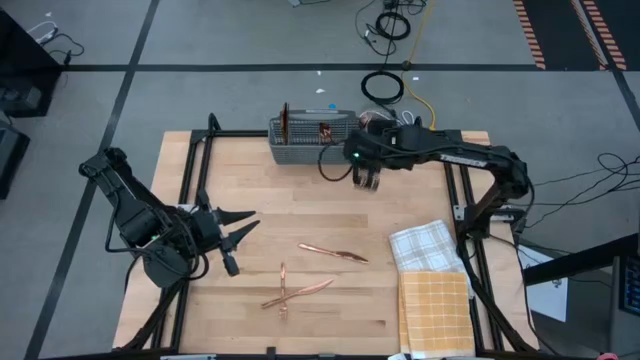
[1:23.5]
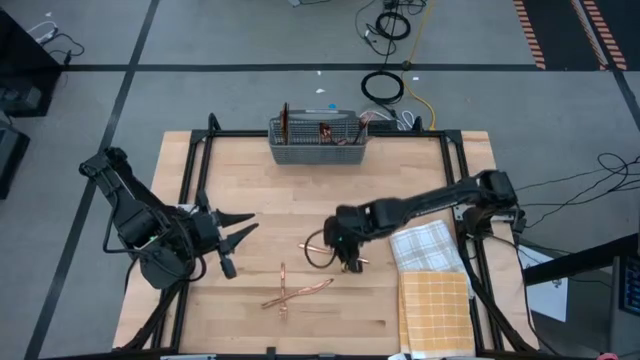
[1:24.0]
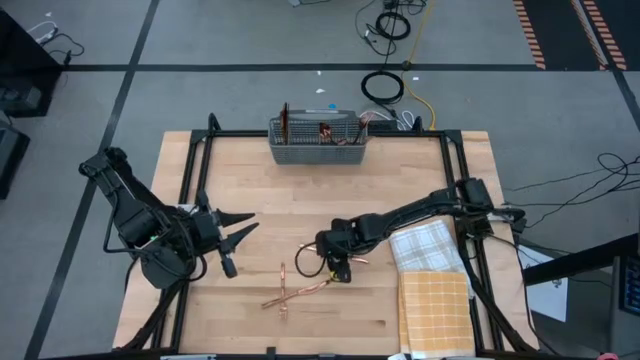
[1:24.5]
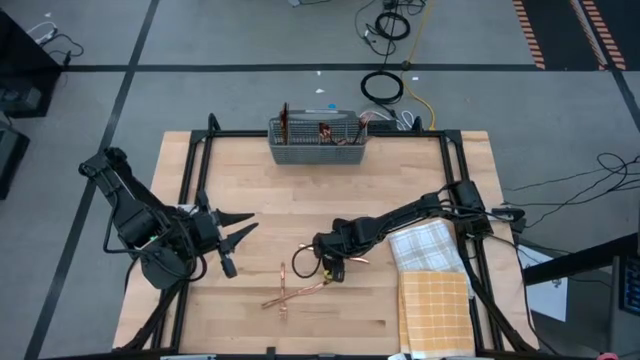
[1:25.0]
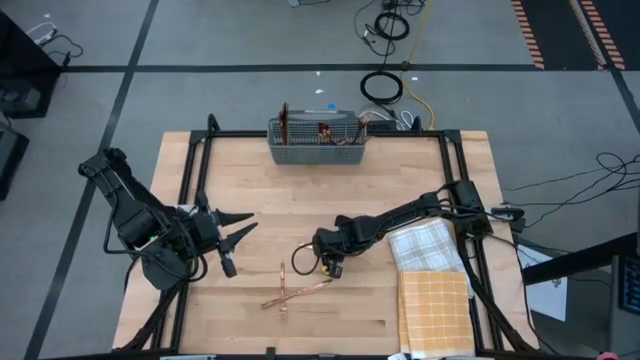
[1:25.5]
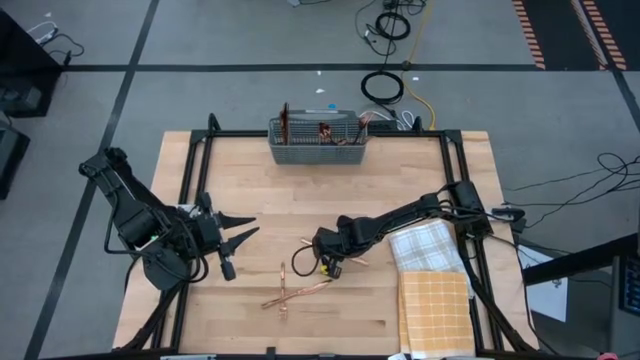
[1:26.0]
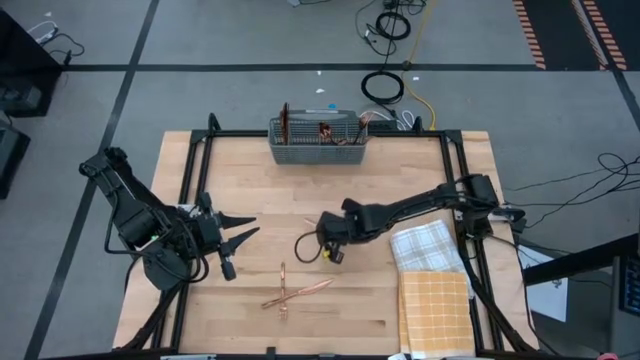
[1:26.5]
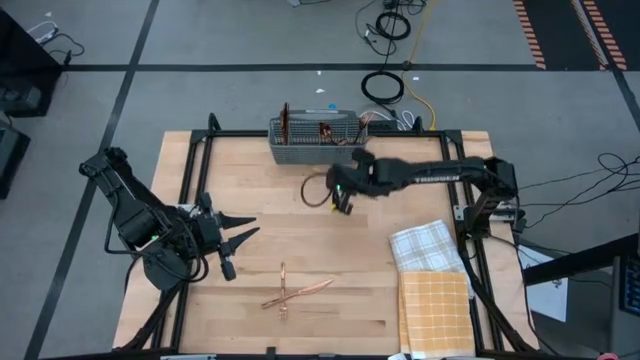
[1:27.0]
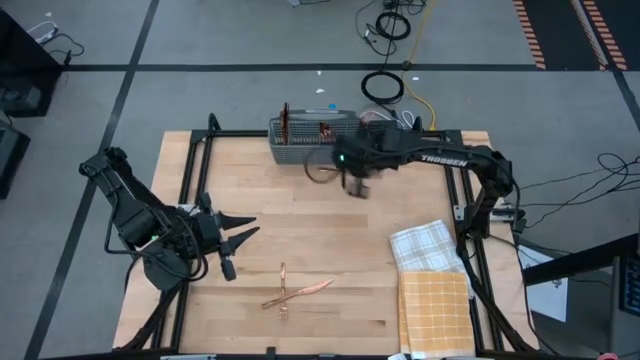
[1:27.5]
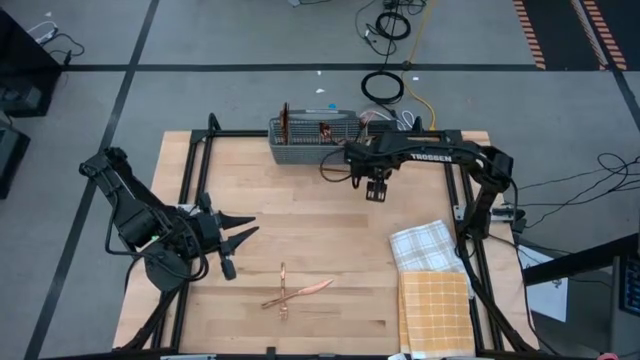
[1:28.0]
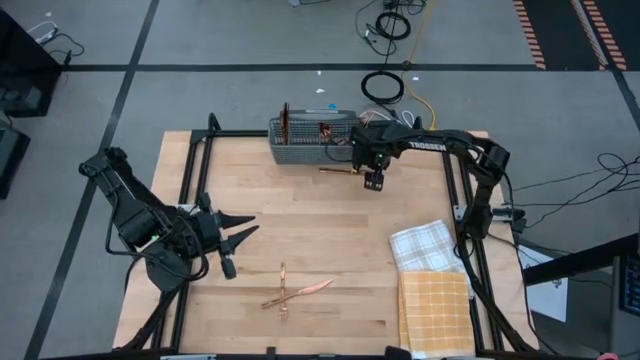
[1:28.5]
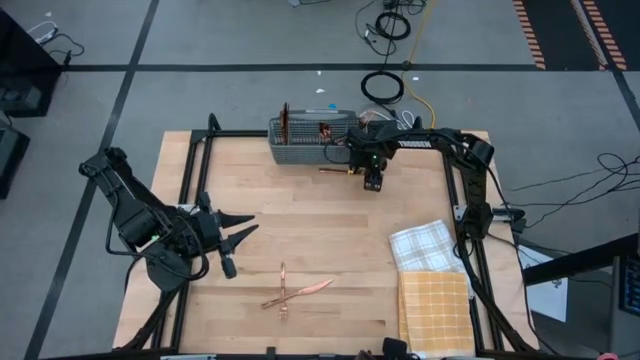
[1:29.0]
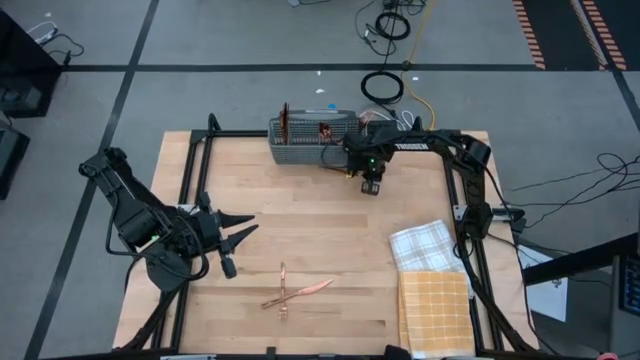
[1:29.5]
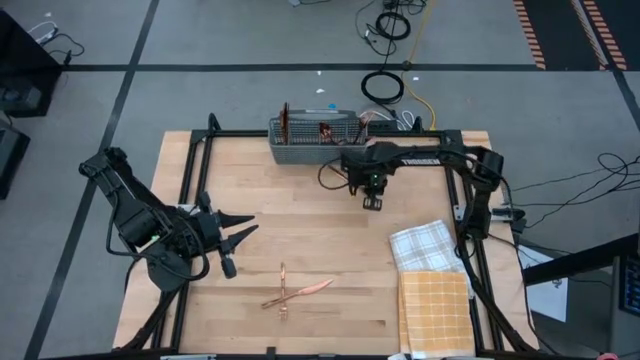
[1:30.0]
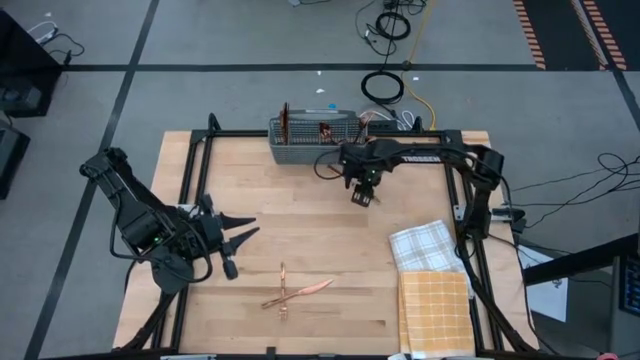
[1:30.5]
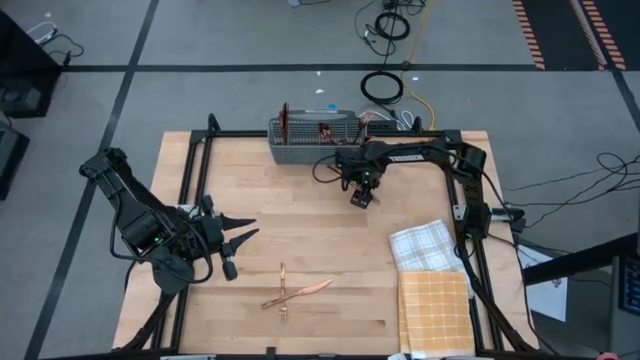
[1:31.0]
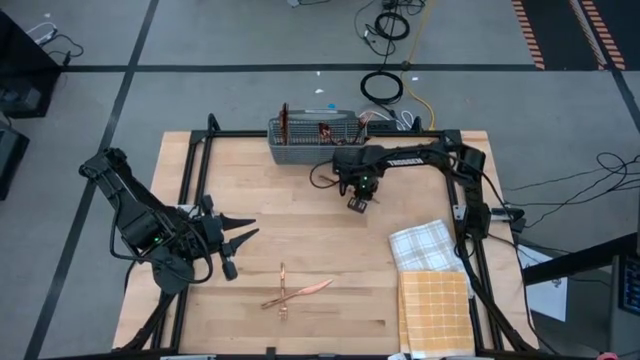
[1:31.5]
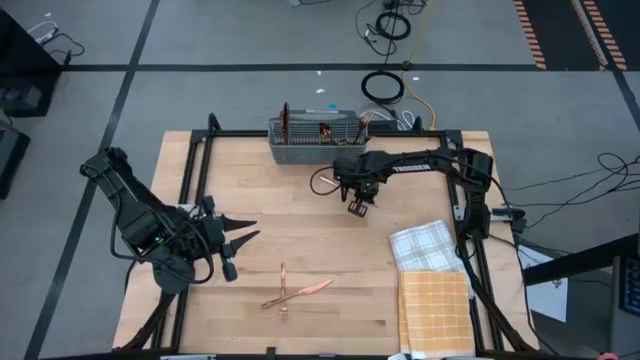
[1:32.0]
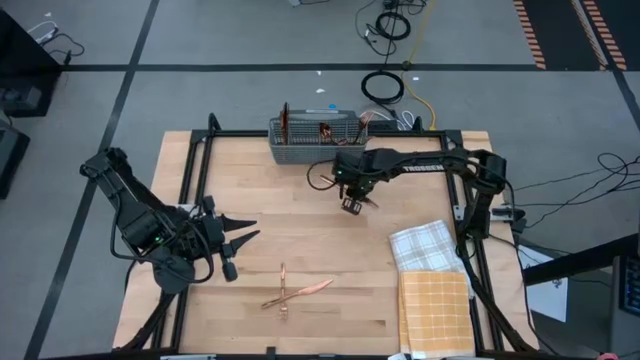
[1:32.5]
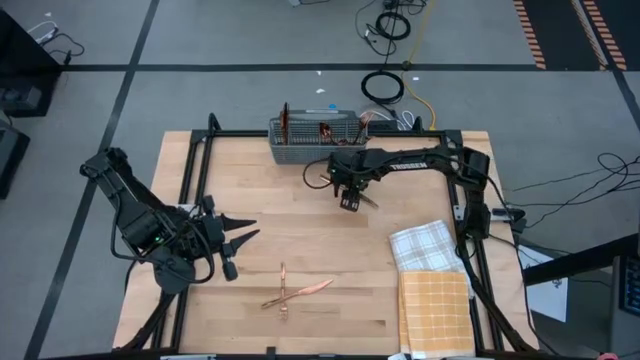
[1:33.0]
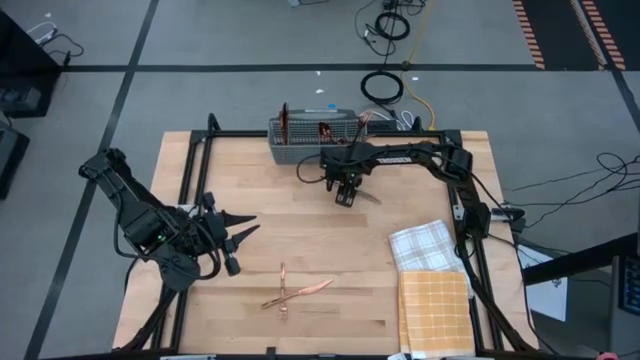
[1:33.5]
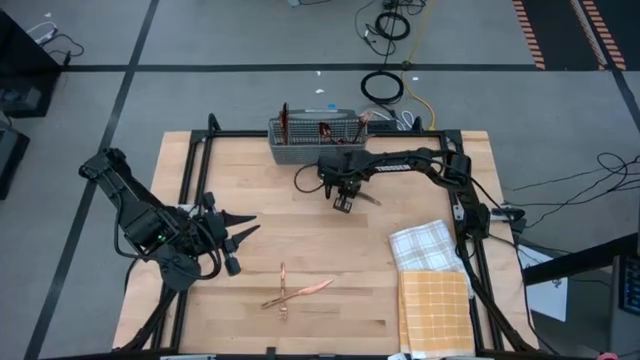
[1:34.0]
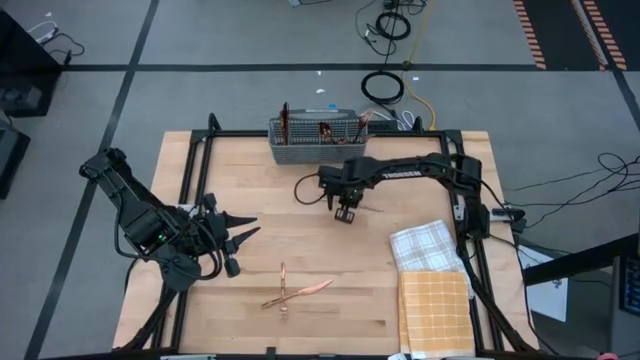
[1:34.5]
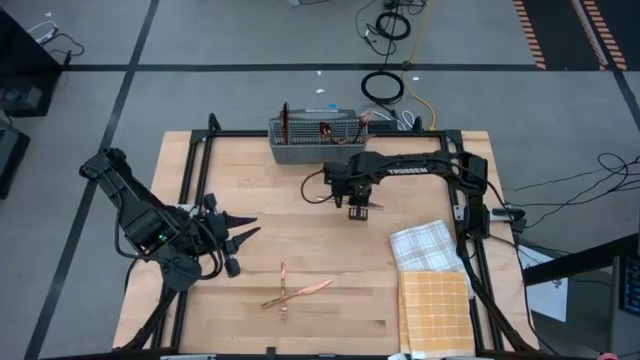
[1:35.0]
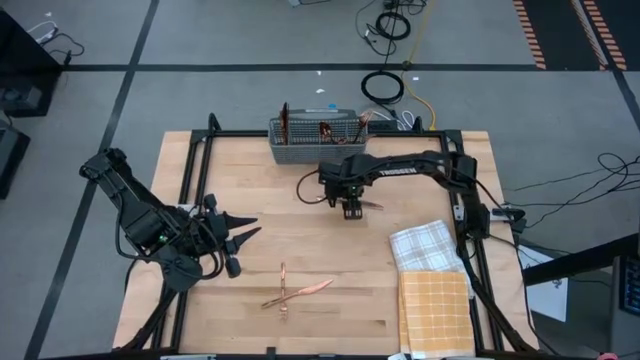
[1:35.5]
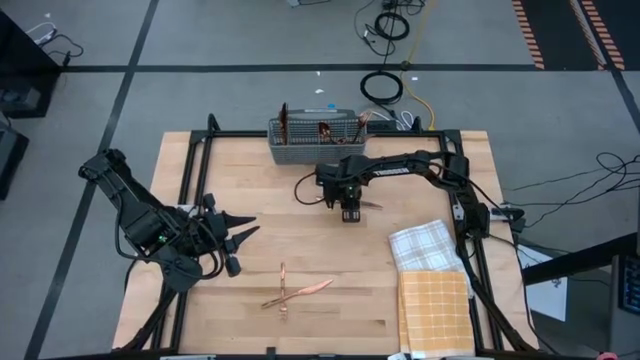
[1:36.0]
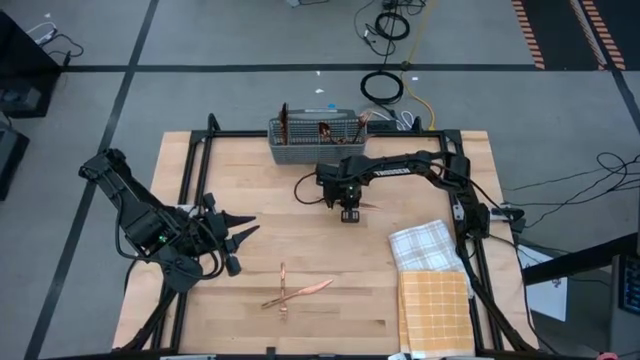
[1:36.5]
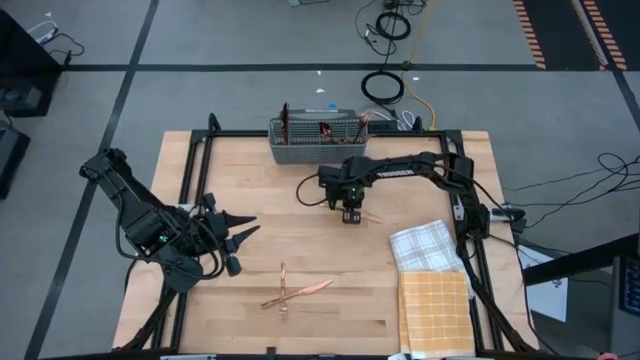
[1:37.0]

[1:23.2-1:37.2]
Task: Sort silverware
Put the top bronze knife into the gray silverware rack

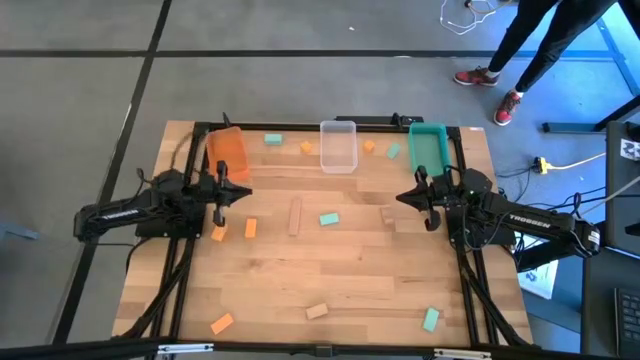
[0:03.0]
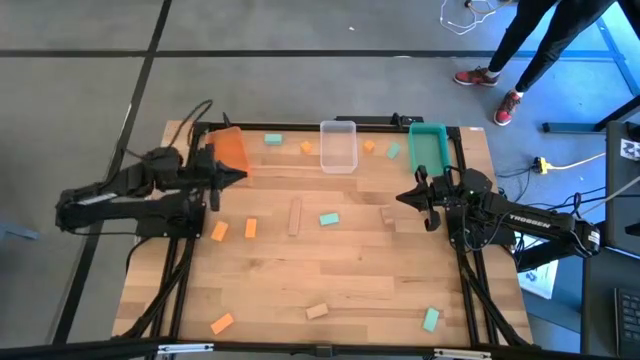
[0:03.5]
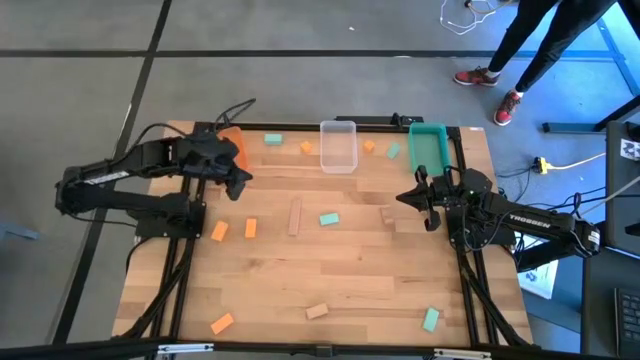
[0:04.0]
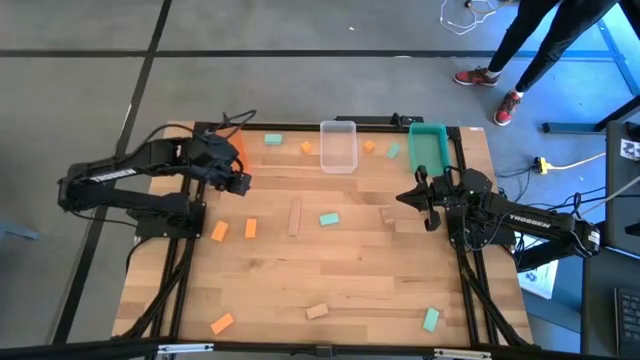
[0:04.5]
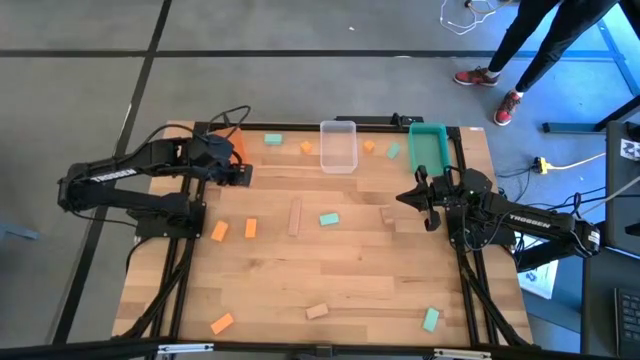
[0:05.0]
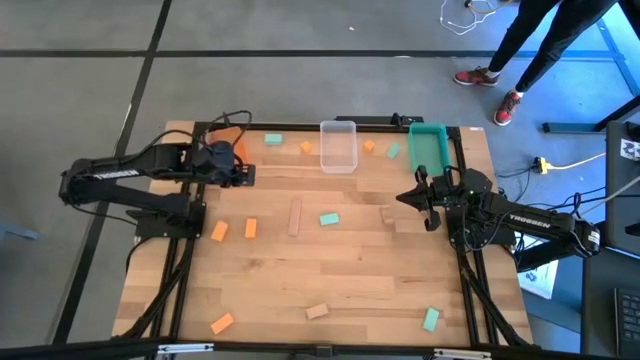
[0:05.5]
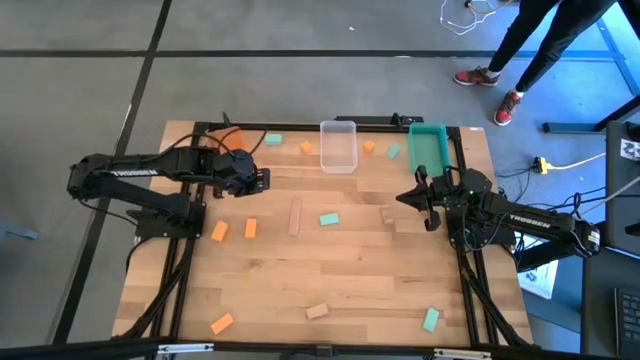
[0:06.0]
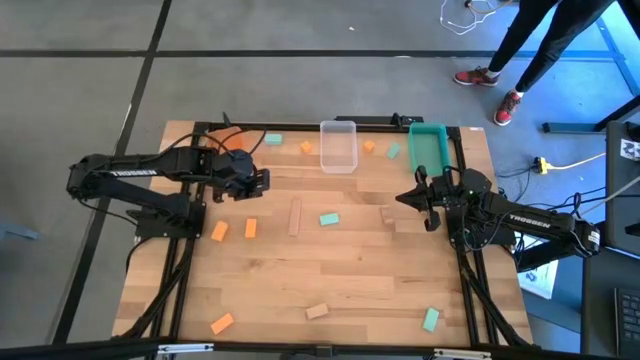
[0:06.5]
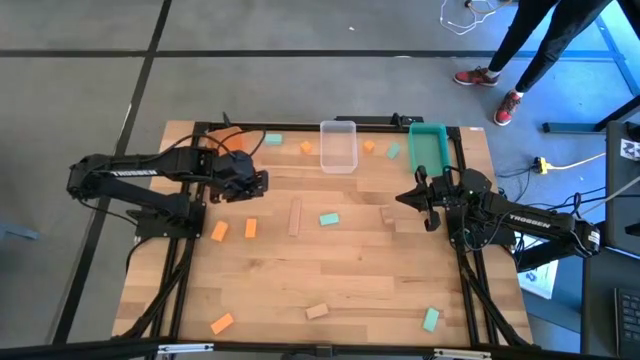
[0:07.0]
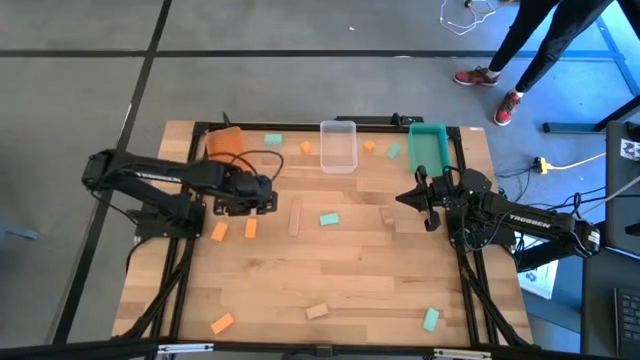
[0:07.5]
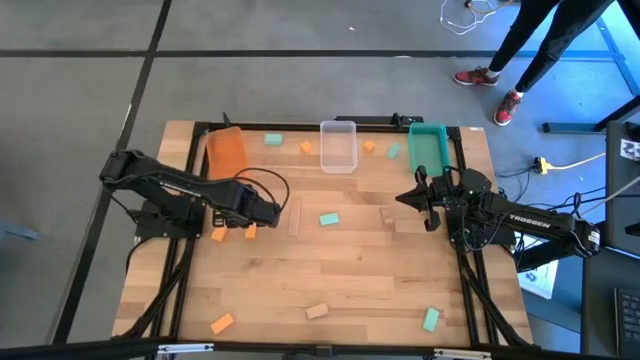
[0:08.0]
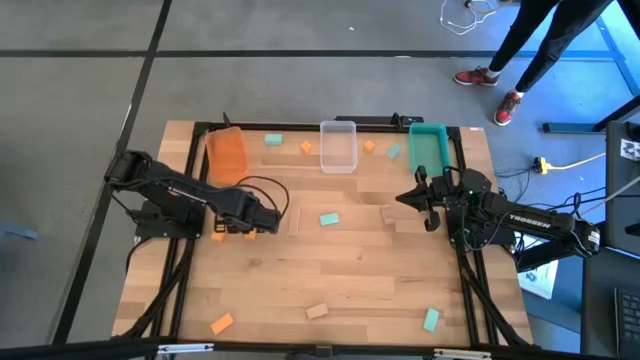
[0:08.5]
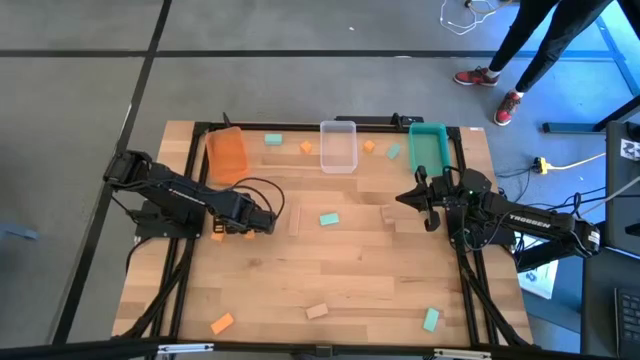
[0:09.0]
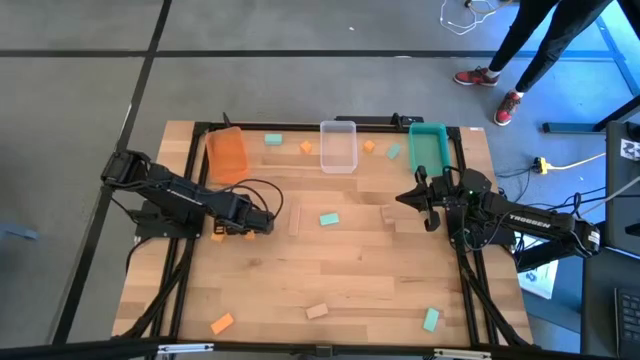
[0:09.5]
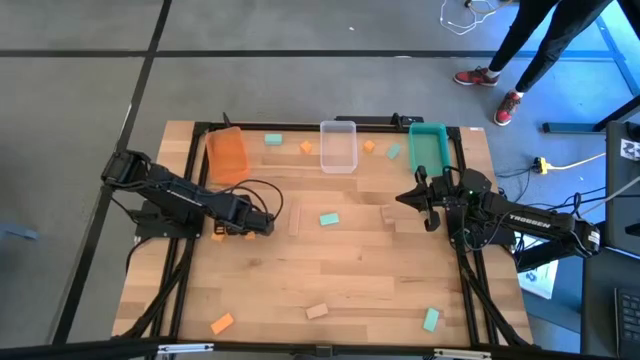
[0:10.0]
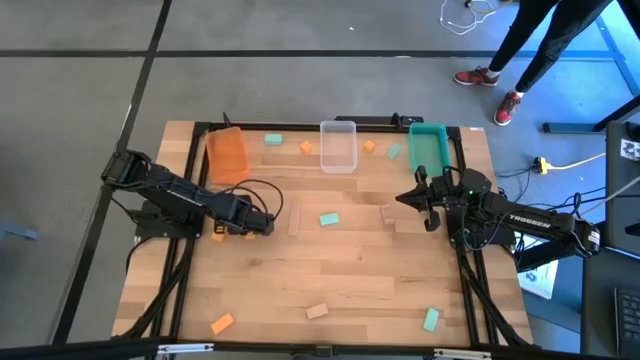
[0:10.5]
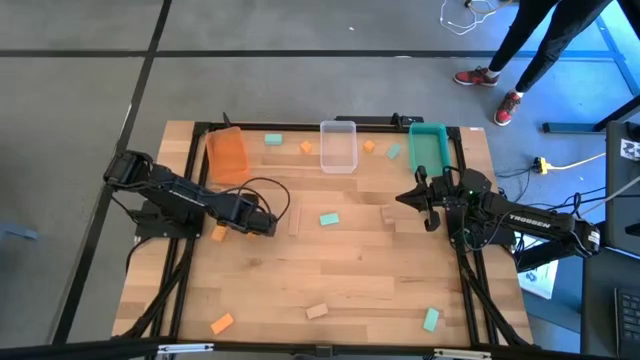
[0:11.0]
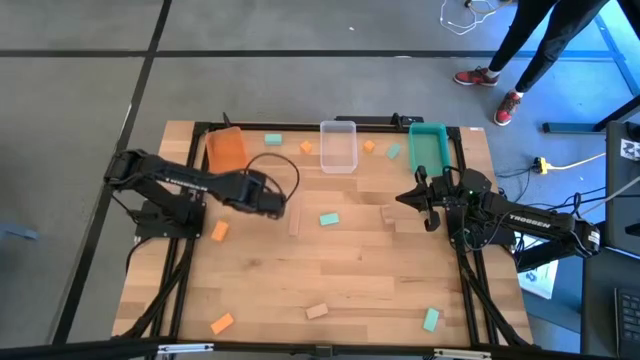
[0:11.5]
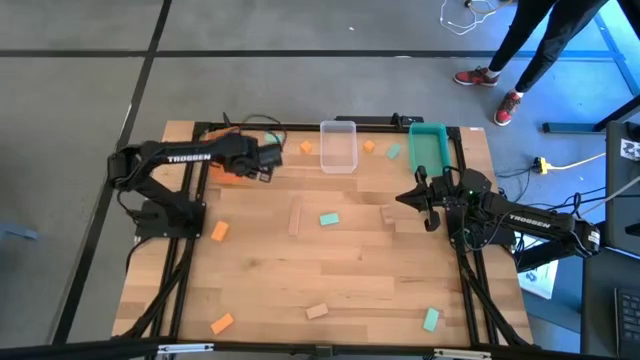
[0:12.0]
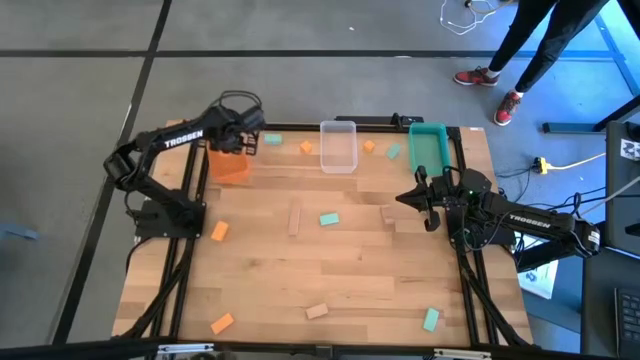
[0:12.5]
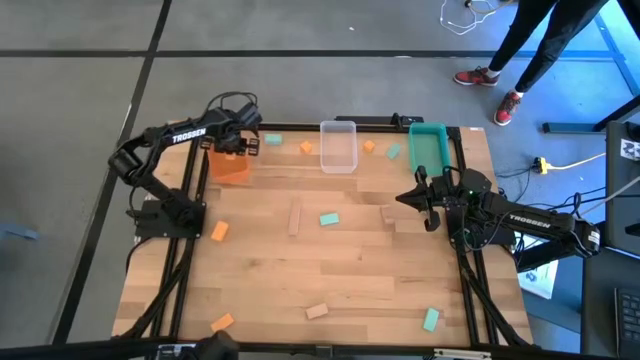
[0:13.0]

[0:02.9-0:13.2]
Task: Sort & place blocks by color
Put the orange block into the orange bin
